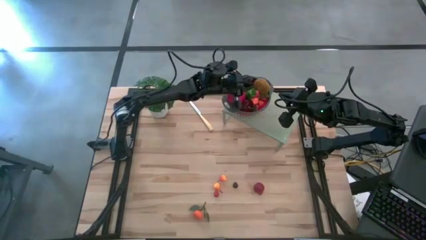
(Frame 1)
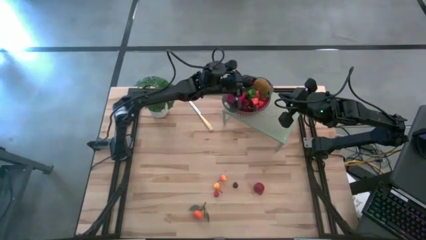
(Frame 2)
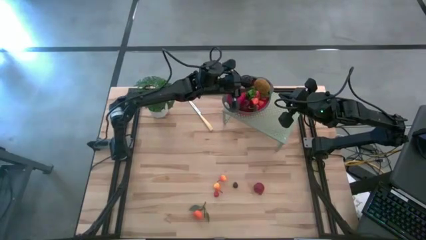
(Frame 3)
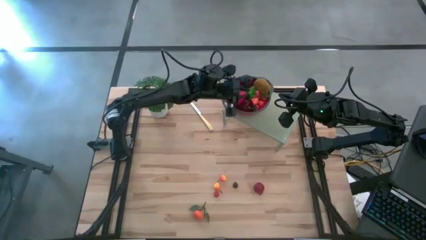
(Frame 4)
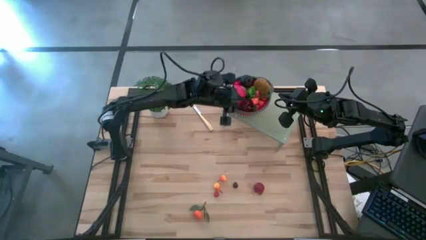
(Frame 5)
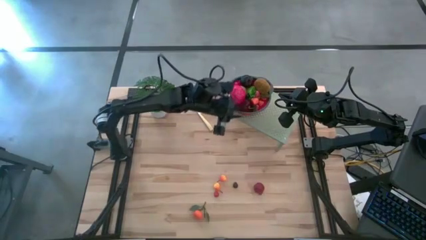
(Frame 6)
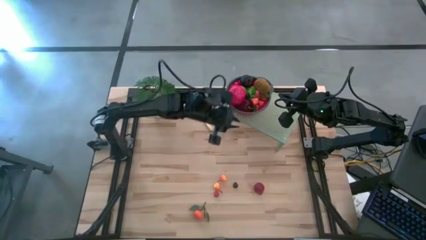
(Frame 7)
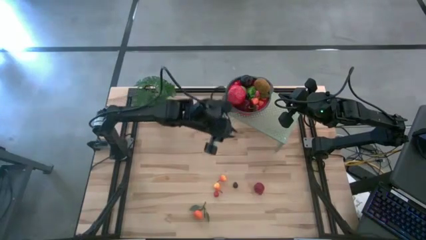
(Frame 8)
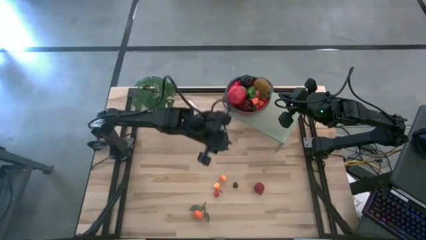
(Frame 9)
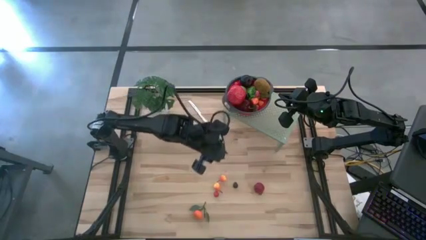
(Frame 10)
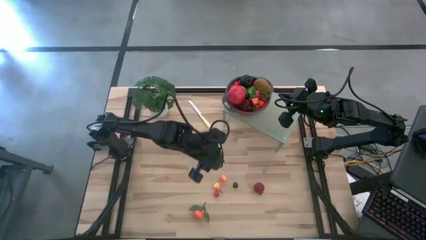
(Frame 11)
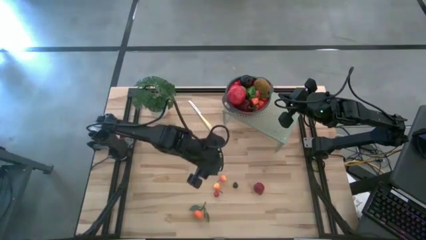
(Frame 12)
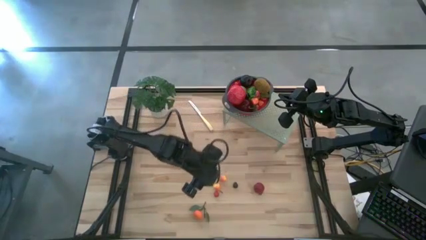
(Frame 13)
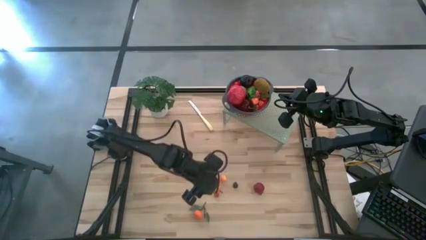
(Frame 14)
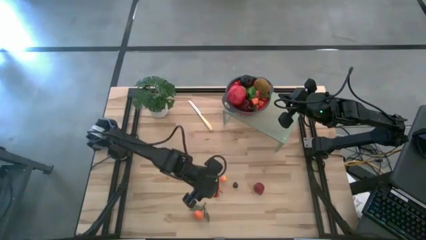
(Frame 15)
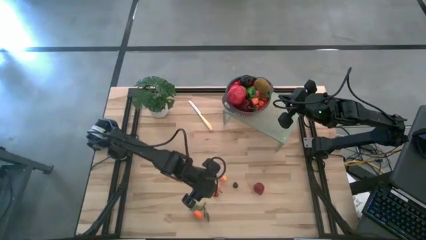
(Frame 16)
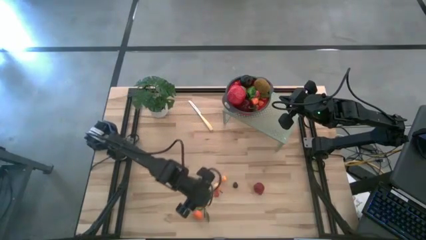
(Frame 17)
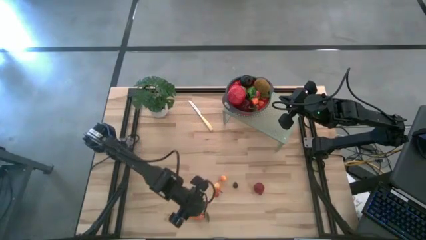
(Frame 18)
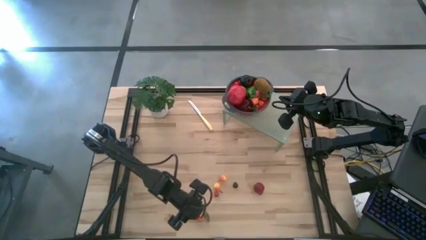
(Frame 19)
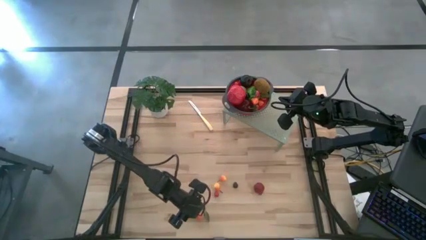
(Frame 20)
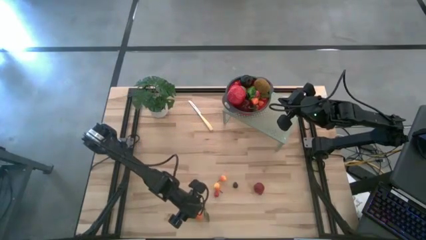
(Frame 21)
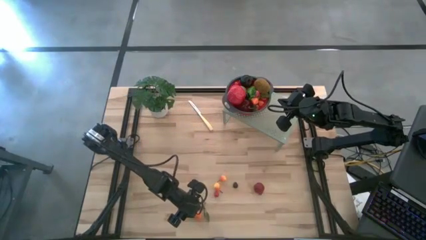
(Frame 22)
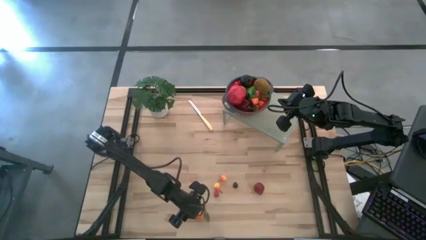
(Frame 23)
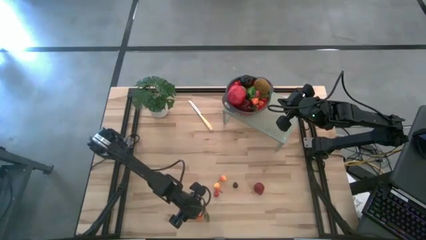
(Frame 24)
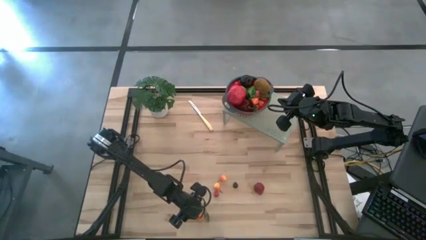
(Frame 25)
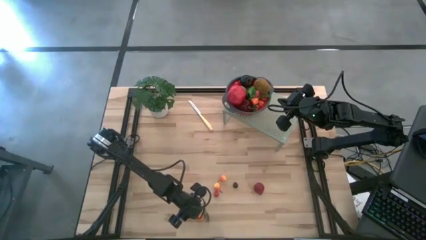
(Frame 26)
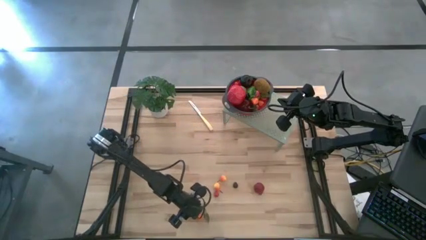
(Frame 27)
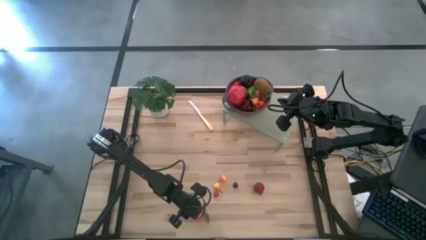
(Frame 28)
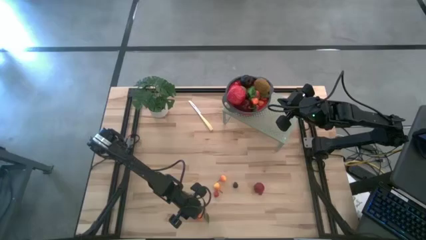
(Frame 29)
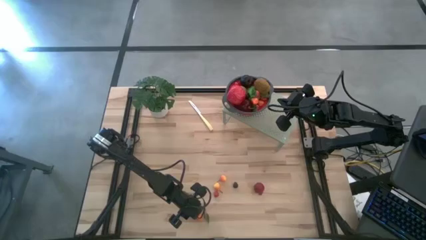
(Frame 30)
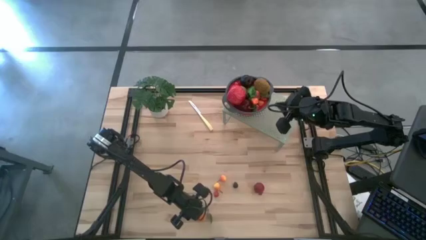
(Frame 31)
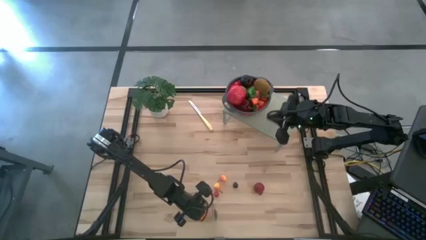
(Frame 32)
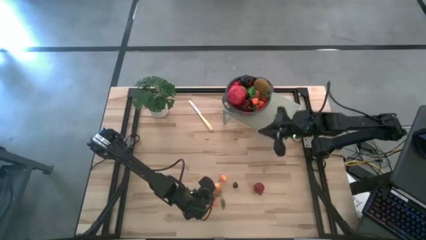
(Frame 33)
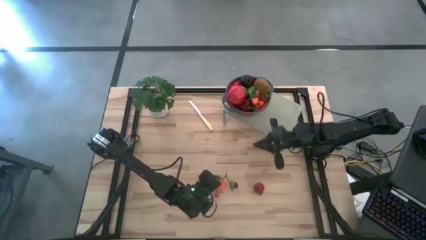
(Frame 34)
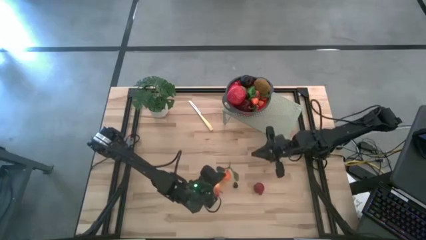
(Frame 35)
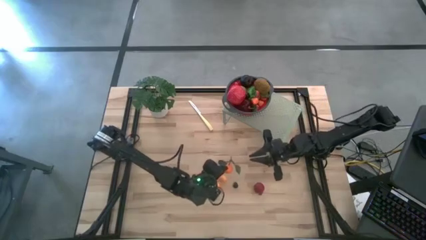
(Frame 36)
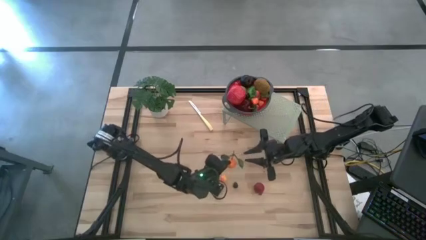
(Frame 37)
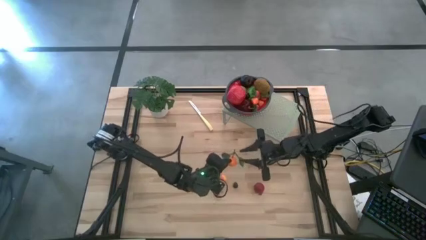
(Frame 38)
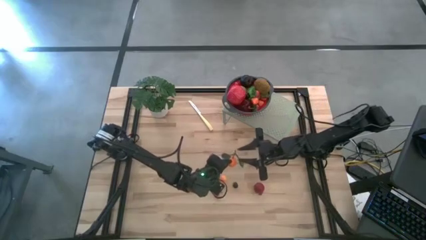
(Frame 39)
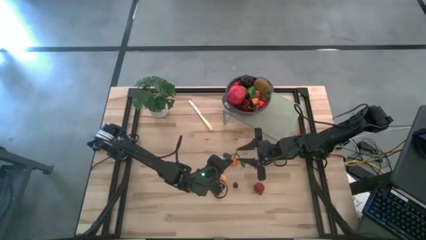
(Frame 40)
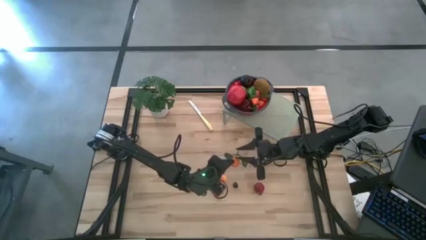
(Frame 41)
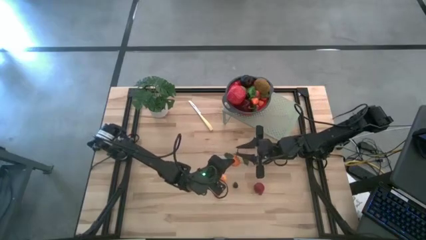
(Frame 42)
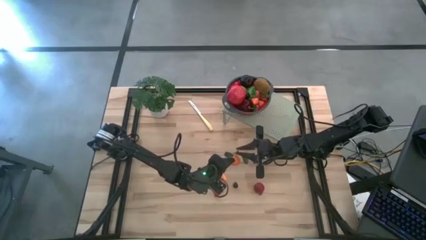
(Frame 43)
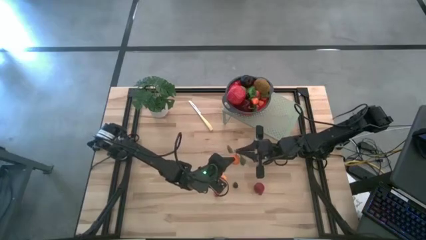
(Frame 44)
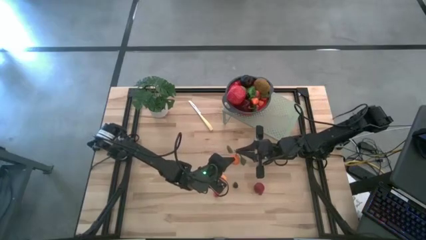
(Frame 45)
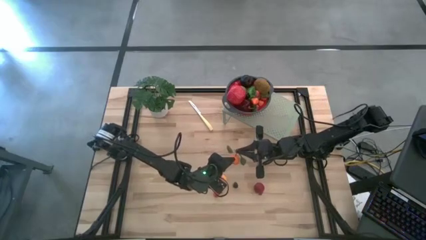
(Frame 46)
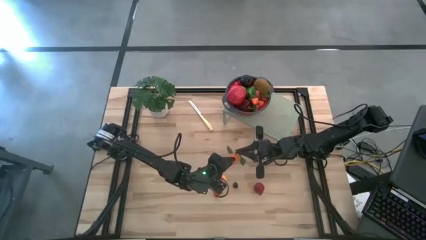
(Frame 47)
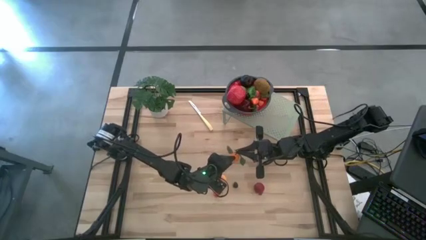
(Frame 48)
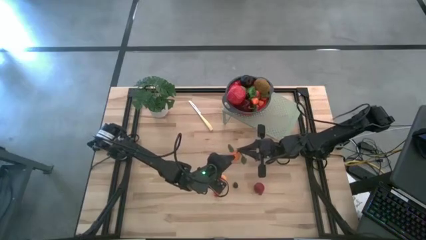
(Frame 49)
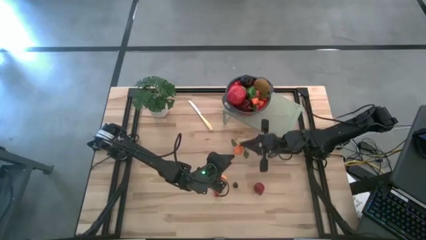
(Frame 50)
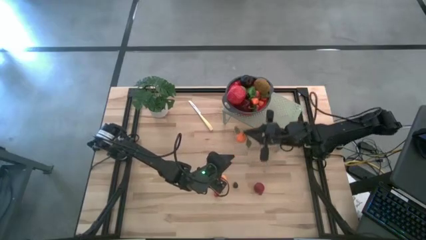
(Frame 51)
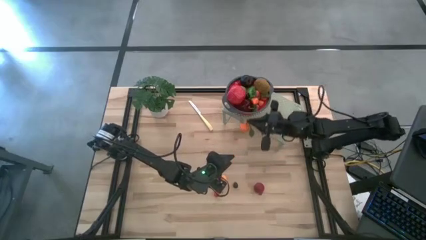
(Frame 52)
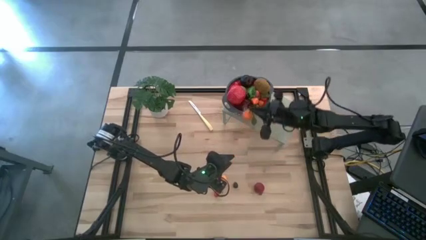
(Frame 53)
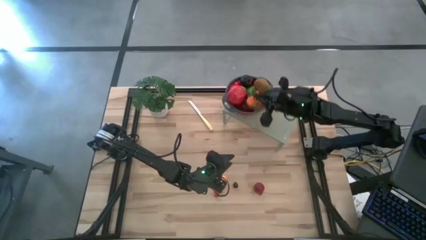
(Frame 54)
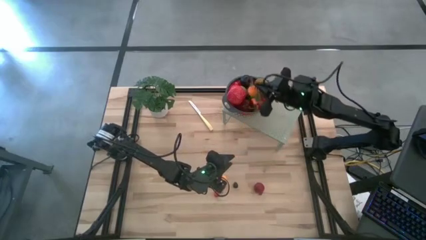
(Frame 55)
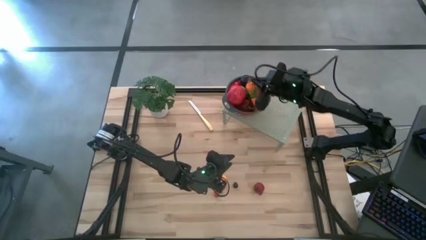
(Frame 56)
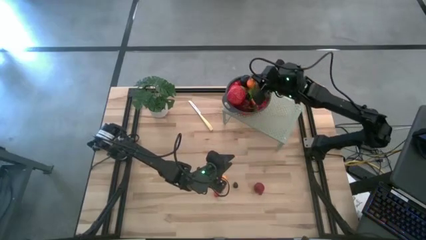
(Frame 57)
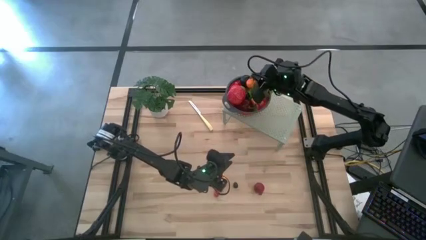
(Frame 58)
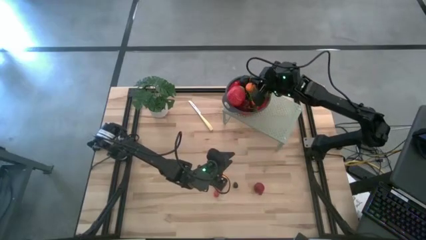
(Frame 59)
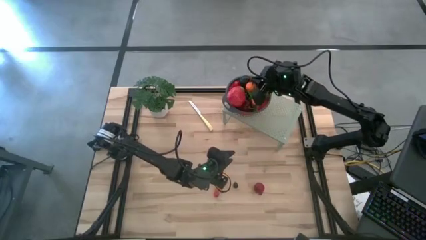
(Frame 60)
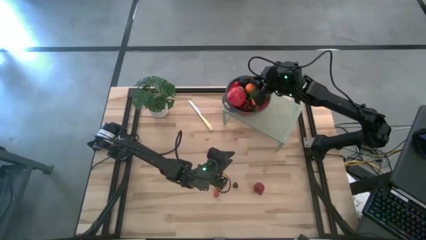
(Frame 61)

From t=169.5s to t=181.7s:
Task: Pick & Place Fruit
Put the orange into the red gray colander on the shelf
